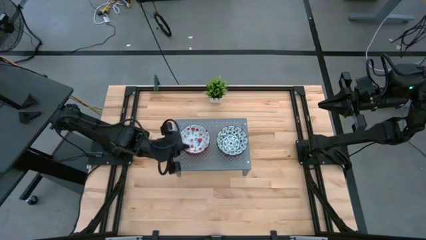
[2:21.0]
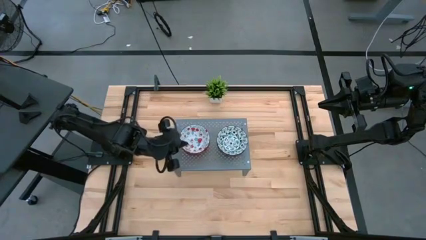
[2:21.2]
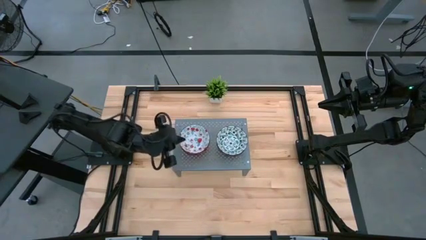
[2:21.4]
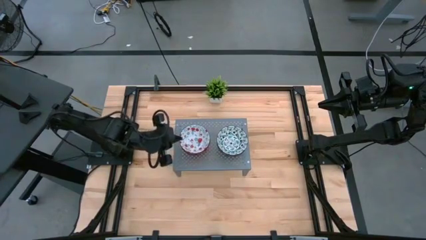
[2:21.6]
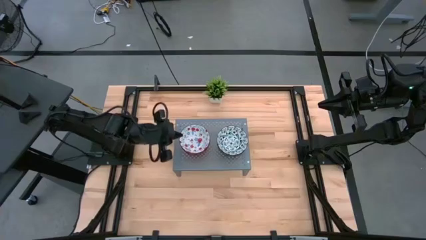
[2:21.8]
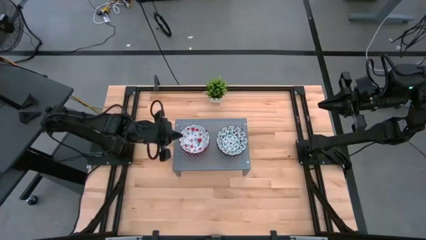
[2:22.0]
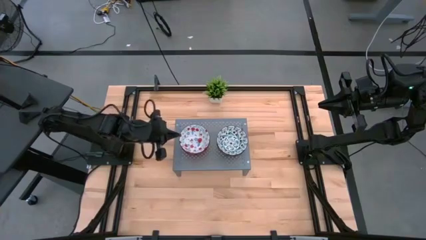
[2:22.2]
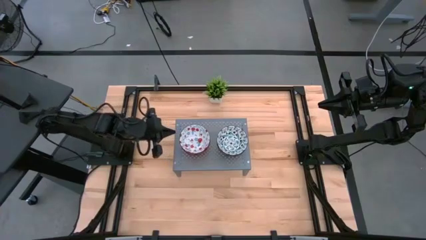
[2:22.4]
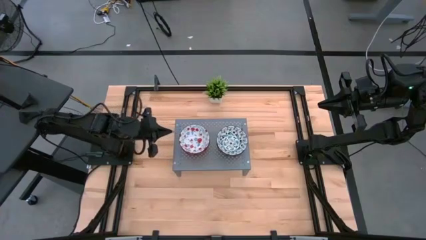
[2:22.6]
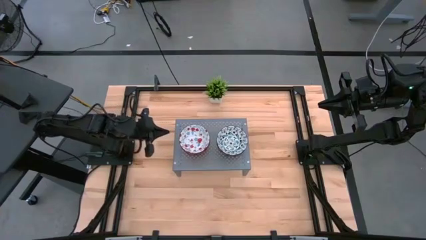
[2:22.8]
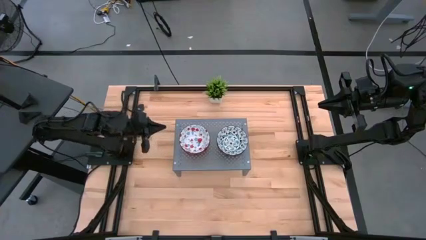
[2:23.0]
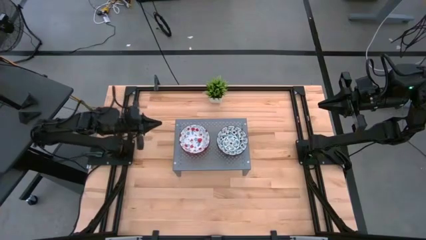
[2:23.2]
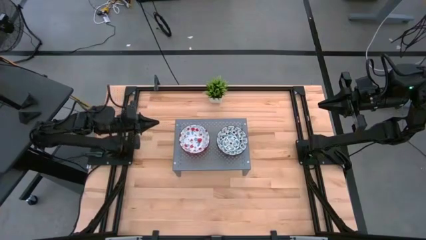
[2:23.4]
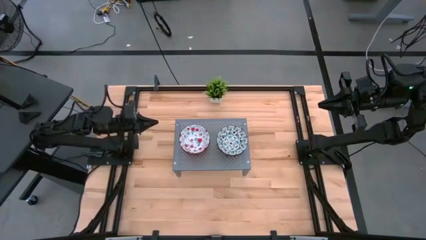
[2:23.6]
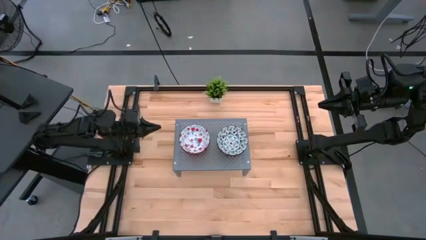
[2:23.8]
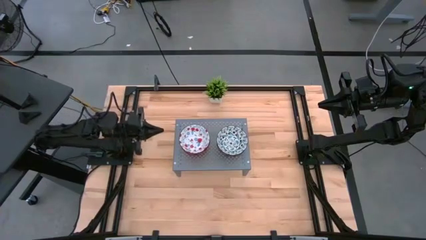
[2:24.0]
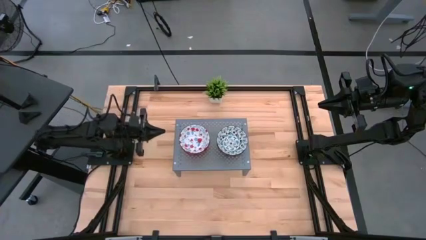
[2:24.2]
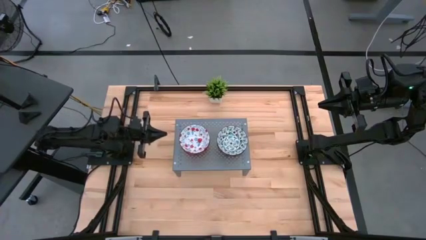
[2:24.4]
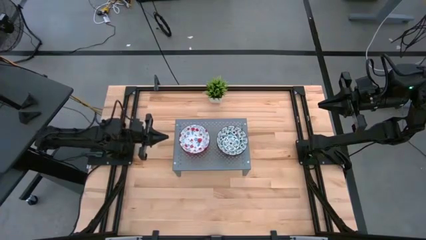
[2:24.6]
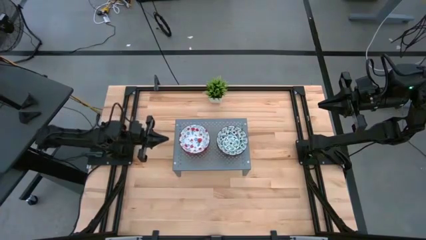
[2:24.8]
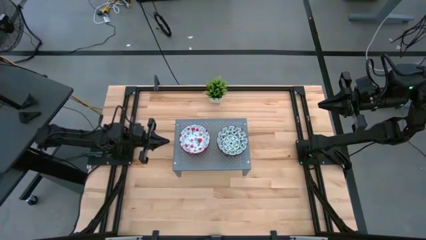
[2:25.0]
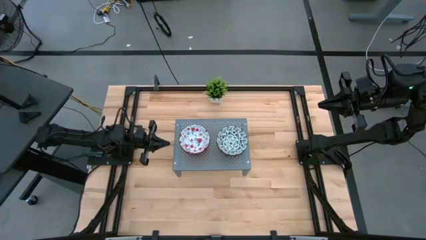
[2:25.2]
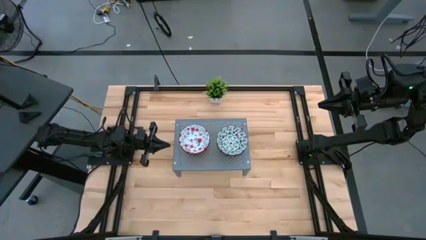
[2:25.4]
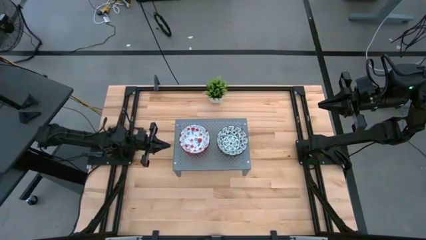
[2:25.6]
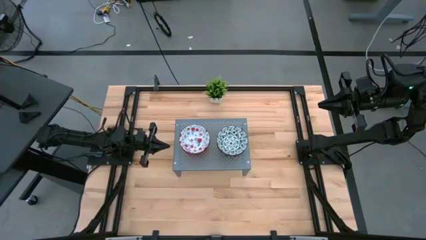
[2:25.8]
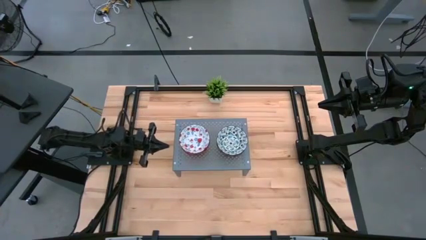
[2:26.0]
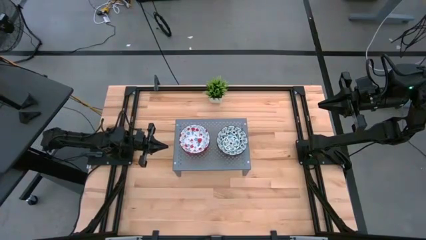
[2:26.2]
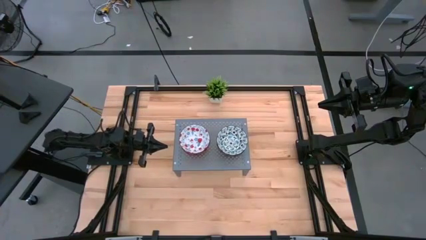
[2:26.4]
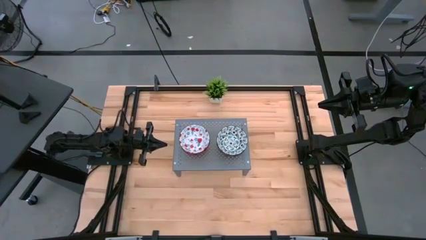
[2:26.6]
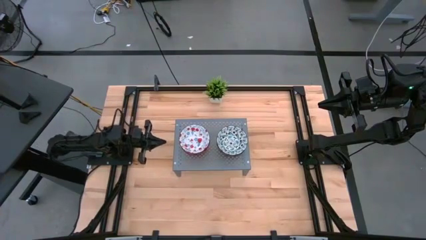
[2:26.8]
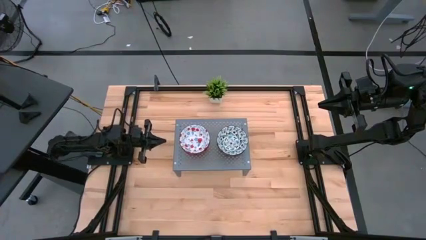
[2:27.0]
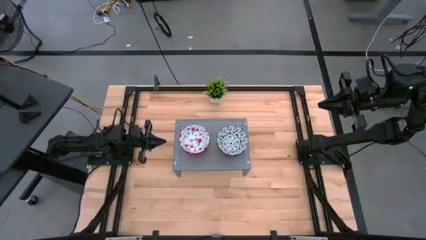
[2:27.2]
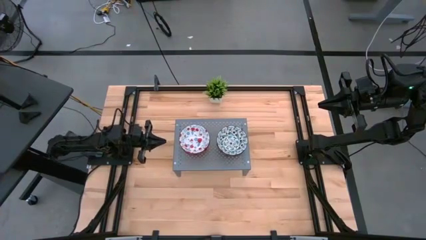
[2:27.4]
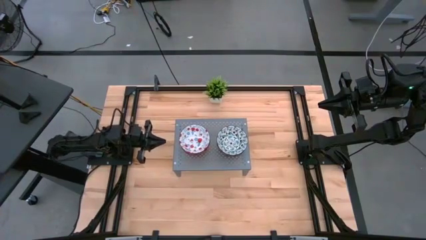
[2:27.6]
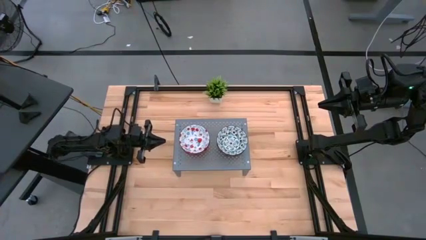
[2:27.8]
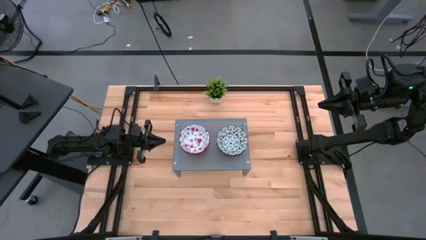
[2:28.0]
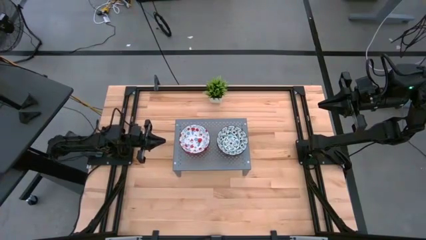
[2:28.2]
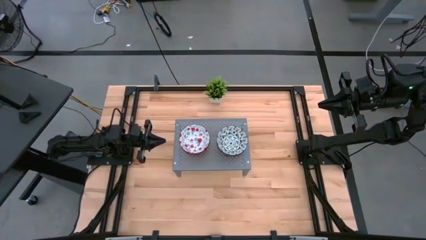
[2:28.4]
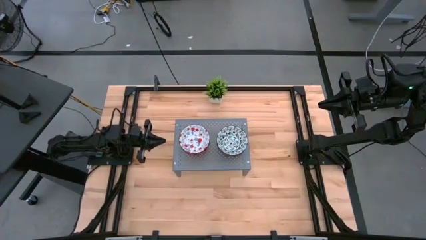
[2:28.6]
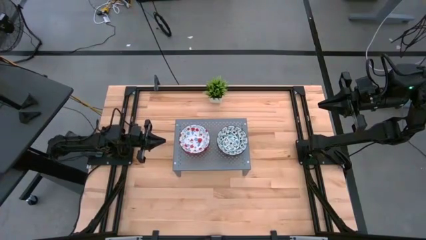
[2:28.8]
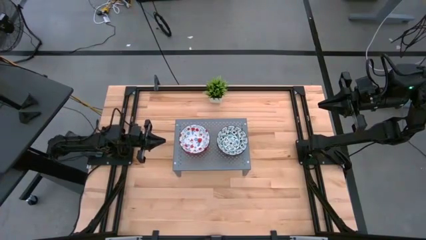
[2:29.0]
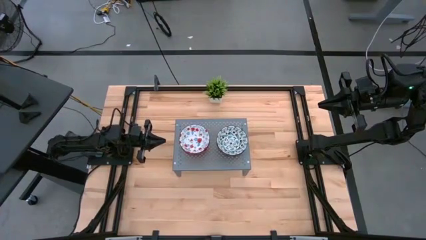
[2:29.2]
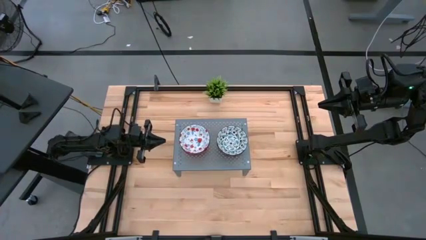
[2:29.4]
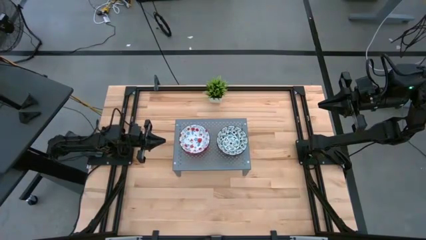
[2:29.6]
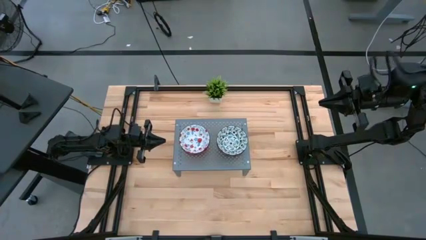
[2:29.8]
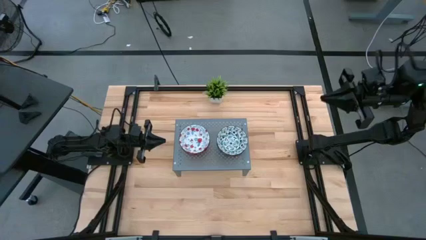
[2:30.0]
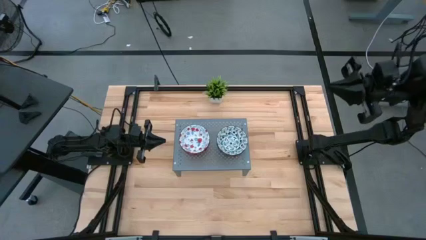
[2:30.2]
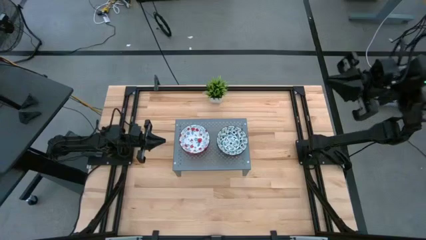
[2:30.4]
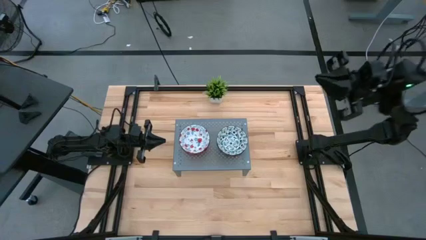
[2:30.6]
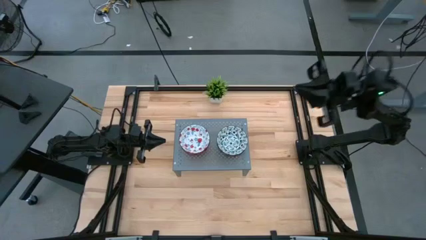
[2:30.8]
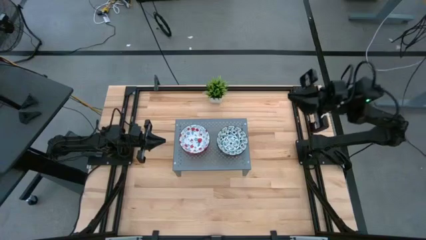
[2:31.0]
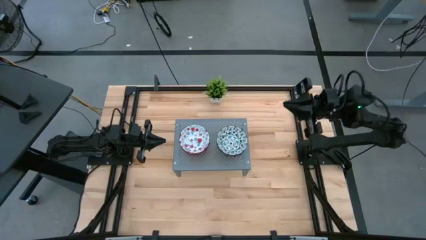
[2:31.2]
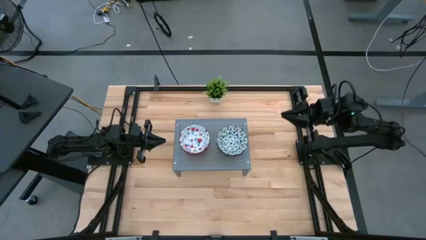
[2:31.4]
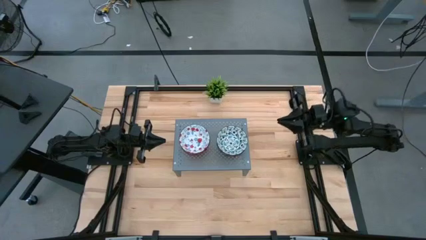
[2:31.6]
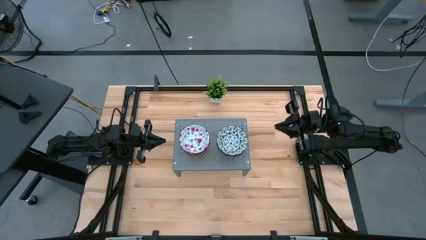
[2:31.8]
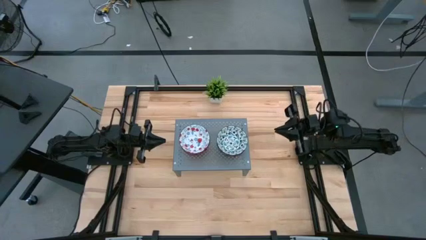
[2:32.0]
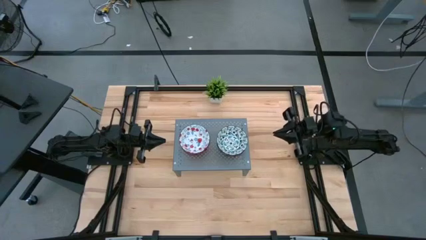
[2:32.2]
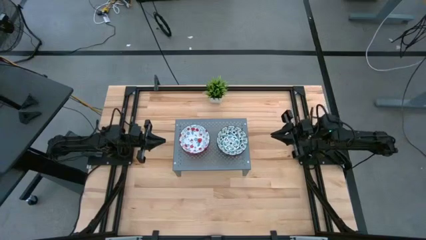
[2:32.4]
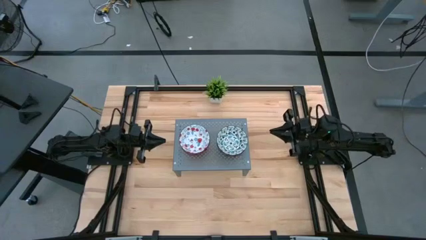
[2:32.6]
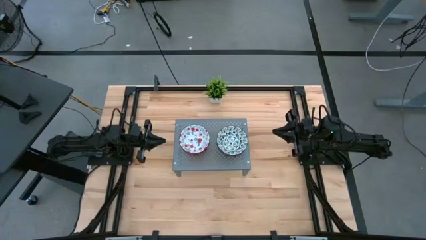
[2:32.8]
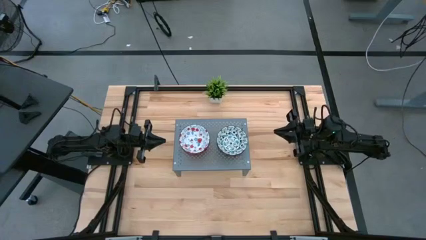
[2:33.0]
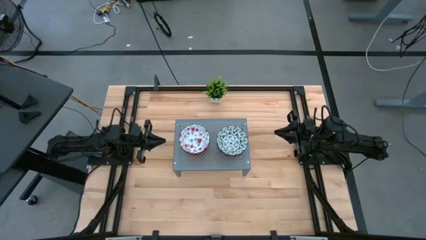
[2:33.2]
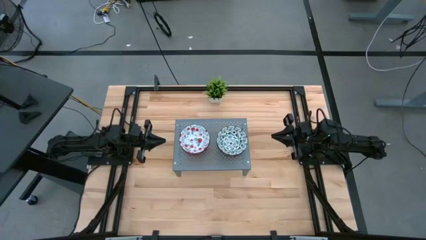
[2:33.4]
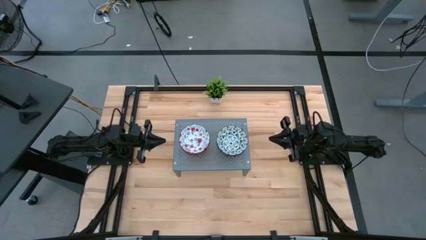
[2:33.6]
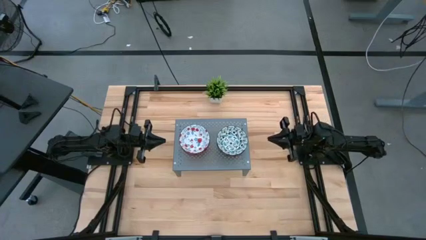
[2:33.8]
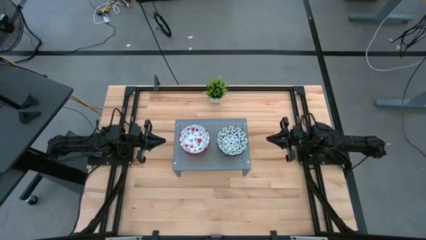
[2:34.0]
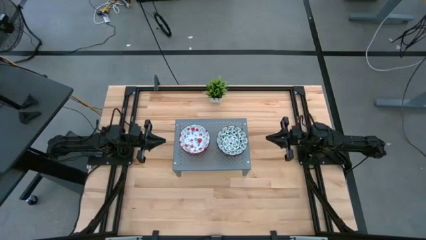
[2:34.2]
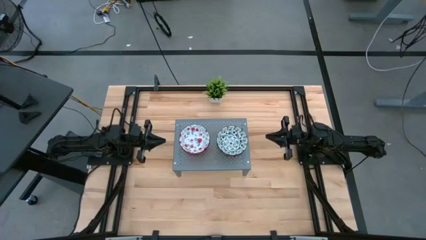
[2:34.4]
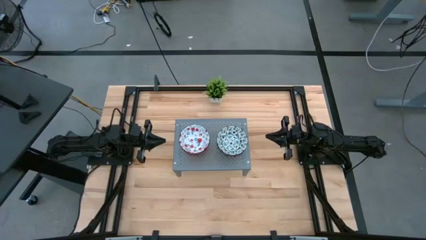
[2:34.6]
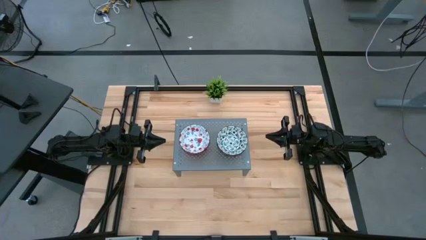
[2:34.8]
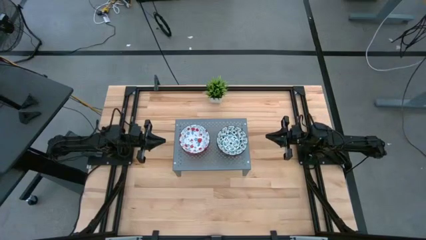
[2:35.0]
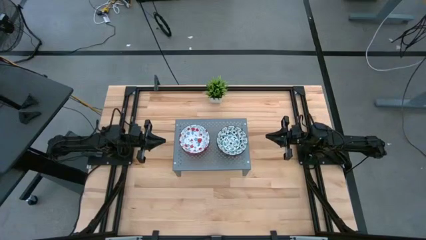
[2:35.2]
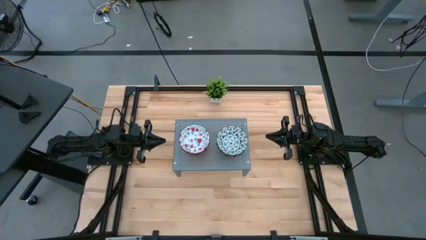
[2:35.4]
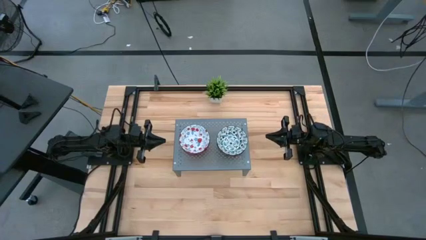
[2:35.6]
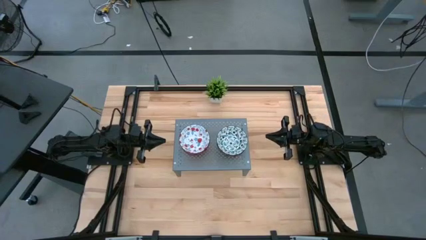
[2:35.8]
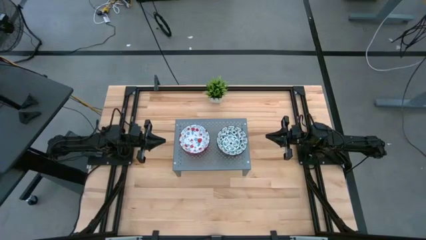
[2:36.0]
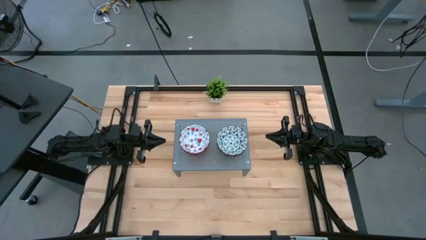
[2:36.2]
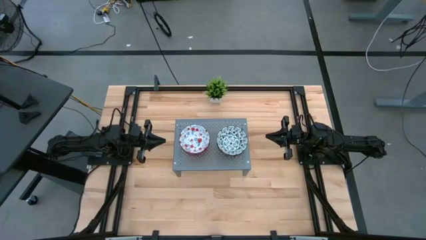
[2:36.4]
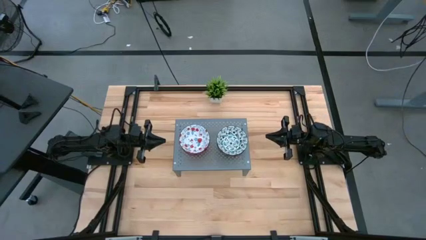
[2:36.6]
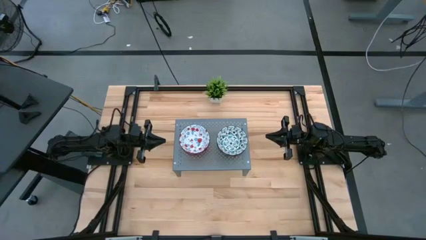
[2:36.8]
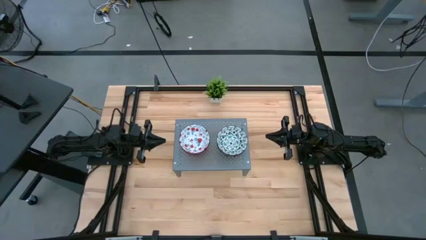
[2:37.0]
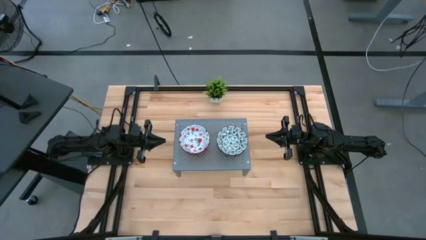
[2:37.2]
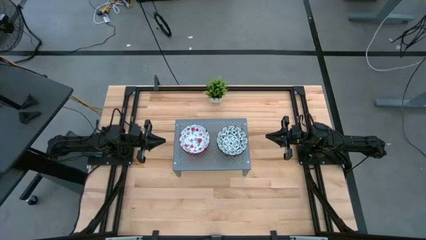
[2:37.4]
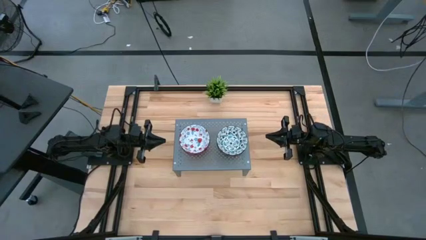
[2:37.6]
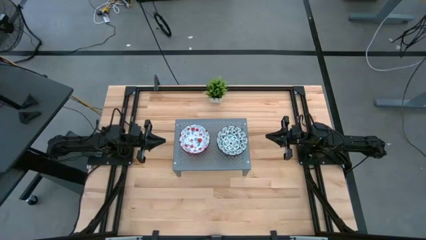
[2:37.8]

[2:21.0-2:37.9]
Task: Pick & Place Mini bowls
Return to Home Position
